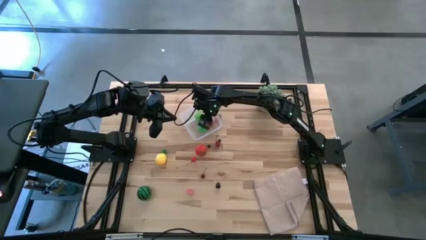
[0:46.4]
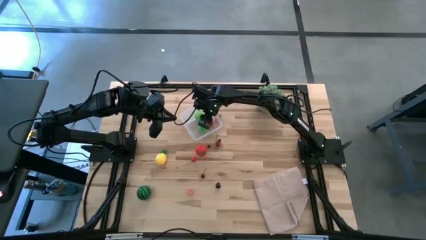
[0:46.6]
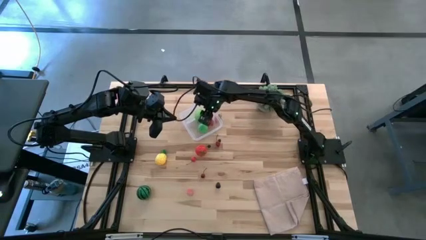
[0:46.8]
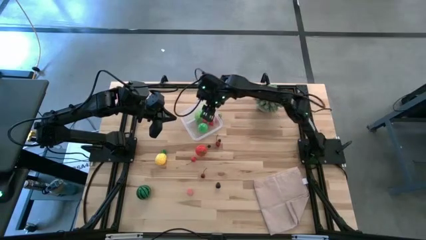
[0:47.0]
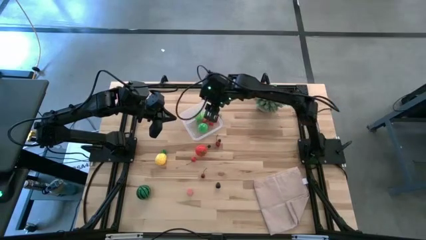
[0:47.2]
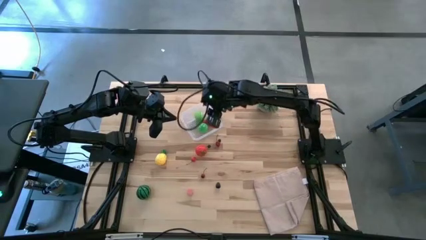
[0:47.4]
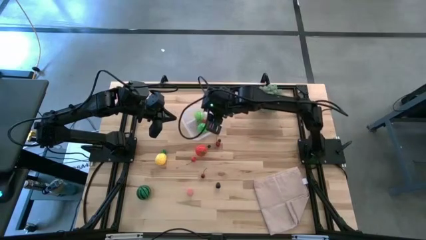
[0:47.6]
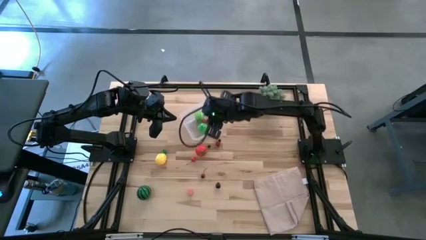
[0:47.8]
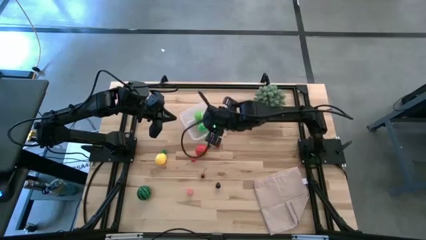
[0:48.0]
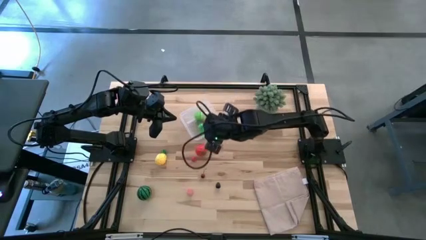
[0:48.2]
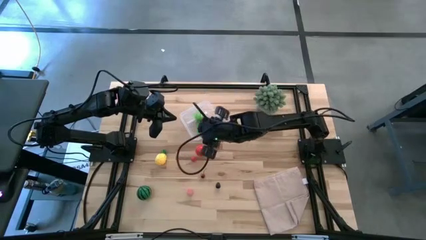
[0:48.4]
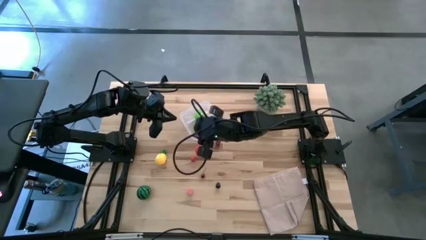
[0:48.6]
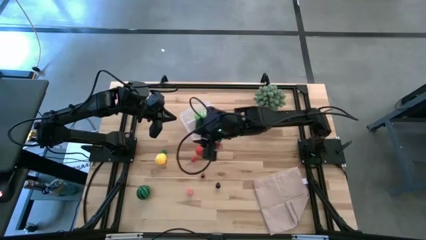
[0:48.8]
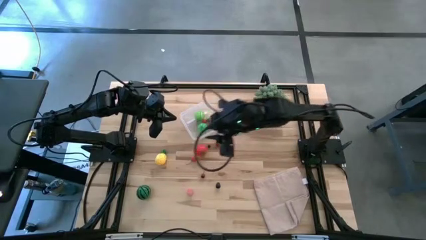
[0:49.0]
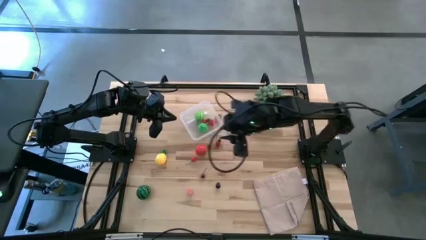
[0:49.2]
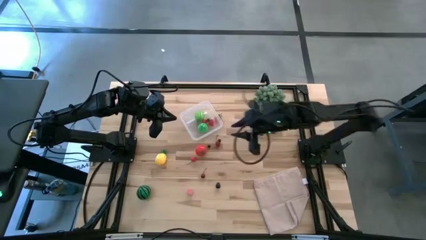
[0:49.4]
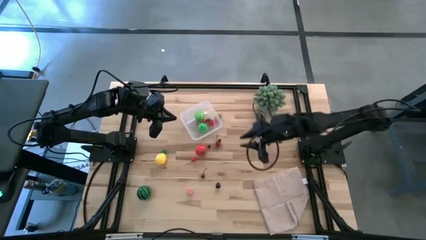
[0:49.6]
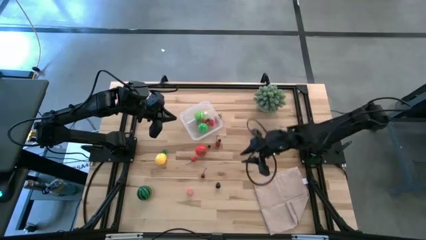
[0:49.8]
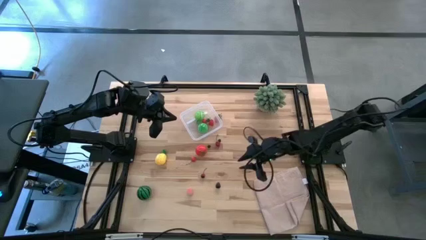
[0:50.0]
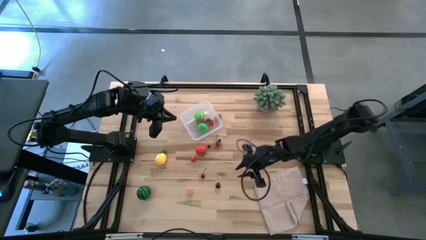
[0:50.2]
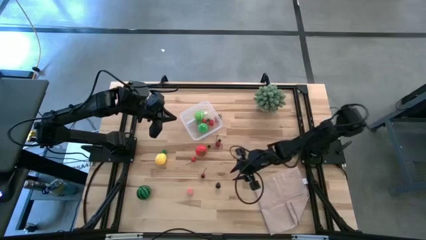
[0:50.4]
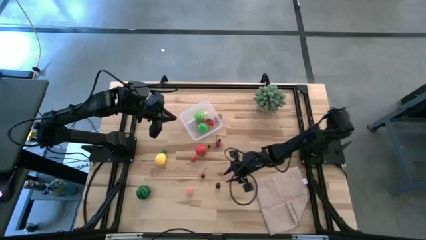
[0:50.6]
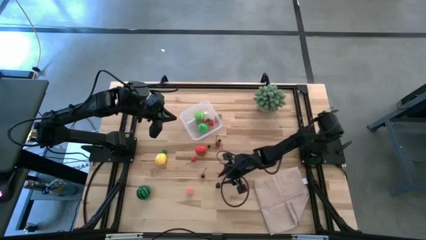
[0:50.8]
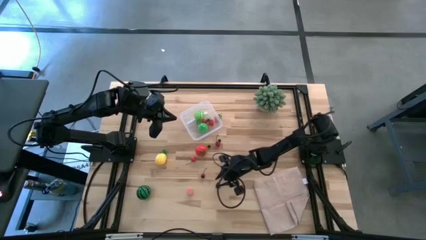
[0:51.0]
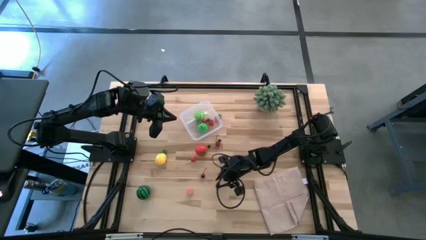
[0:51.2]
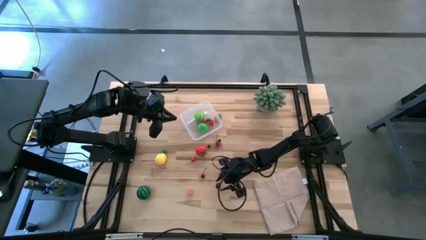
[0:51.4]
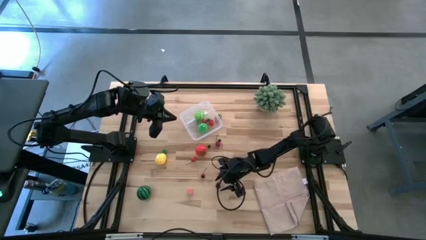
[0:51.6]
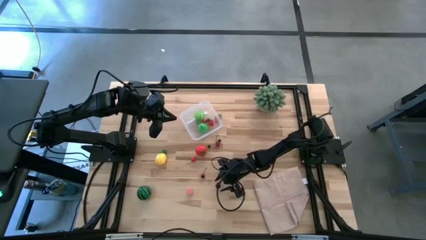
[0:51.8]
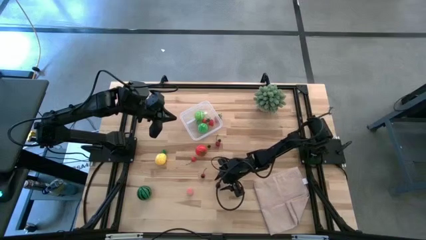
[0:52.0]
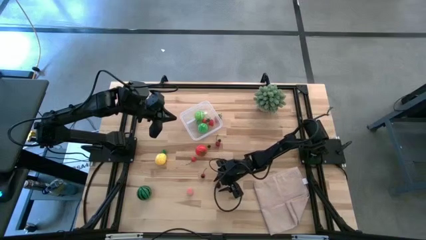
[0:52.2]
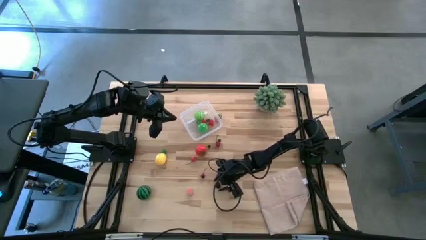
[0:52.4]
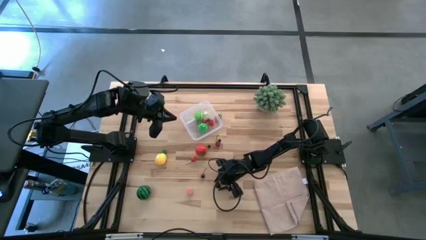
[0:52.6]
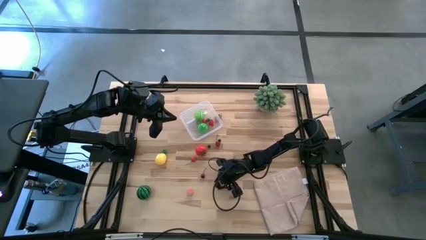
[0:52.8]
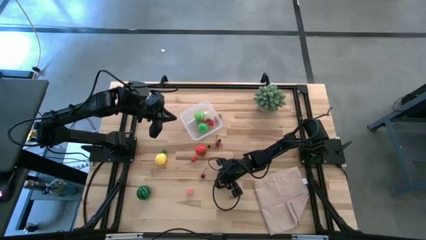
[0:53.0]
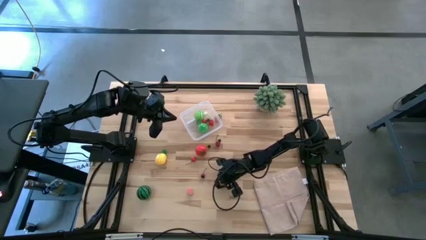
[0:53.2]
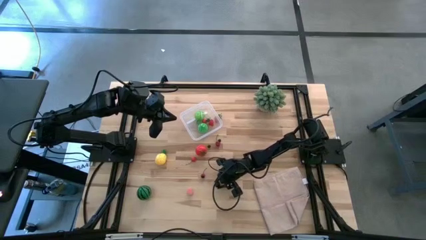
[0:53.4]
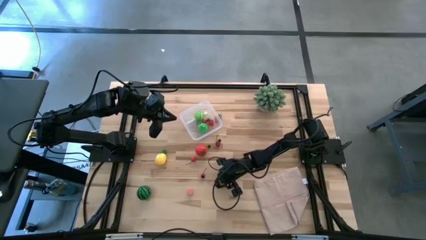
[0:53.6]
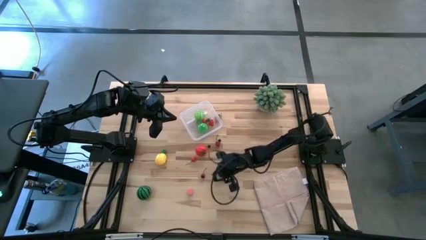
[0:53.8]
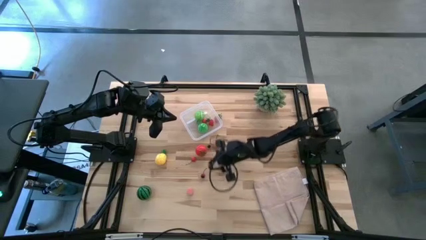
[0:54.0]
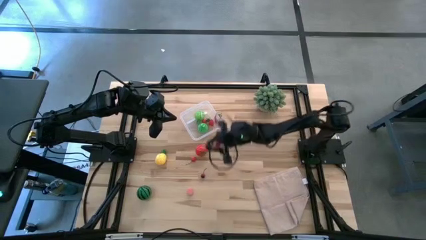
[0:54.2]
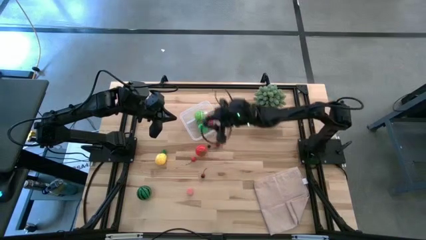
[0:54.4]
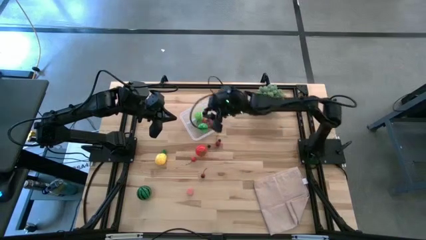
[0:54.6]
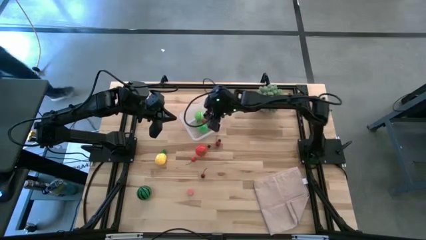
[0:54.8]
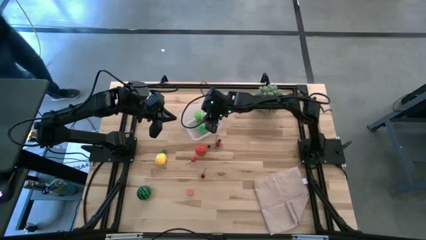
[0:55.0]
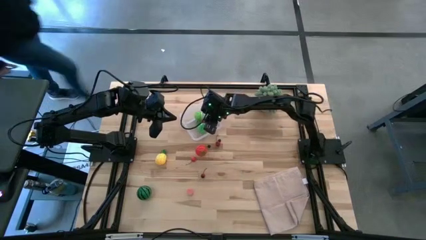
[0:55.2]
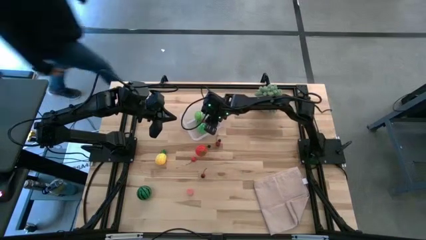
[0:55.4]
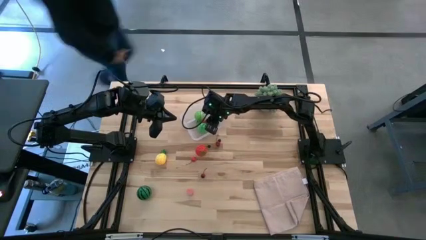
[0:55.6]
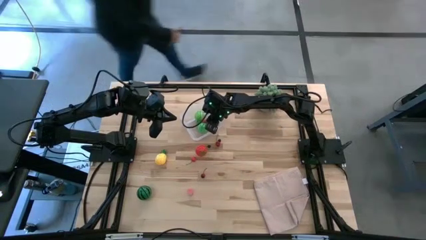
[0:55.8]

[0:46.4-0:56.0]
Task: Pick and placing Produce into tupperware
Put the dark blackberry into the transparent bin

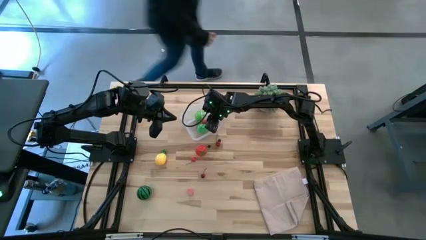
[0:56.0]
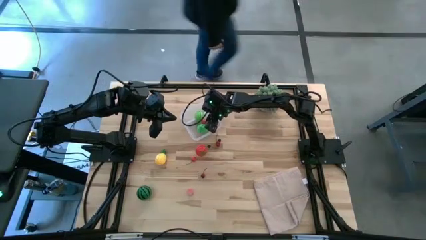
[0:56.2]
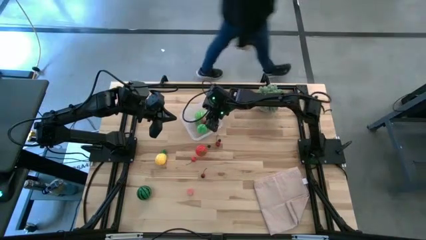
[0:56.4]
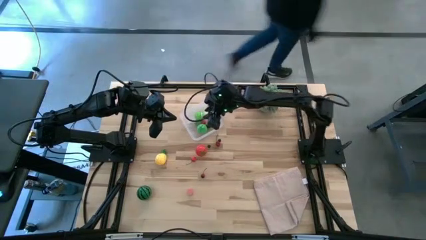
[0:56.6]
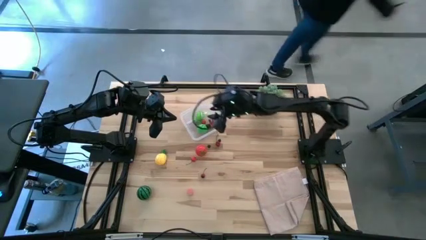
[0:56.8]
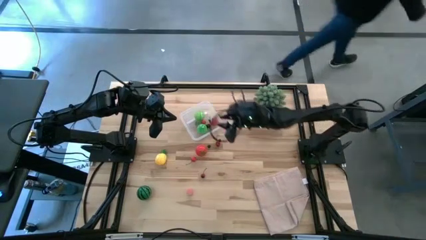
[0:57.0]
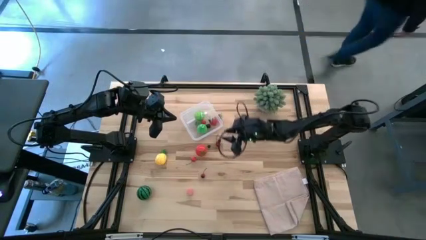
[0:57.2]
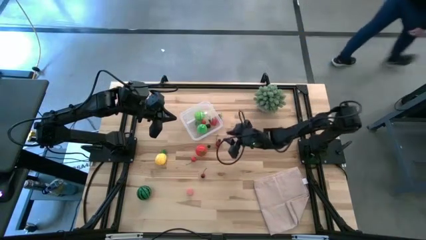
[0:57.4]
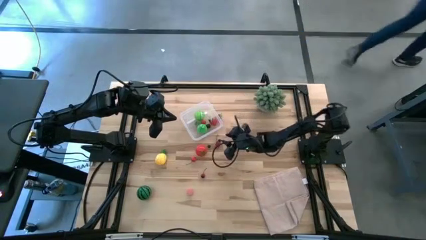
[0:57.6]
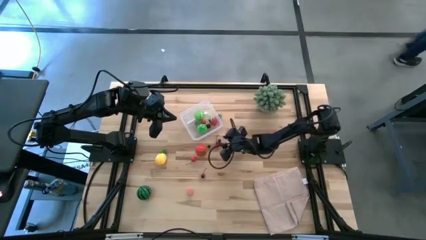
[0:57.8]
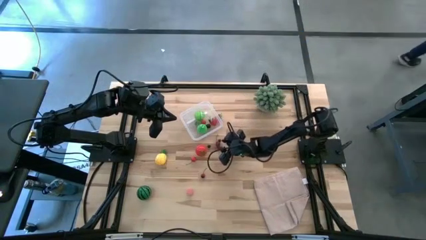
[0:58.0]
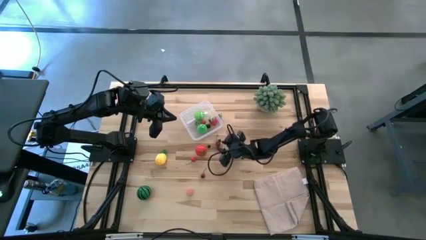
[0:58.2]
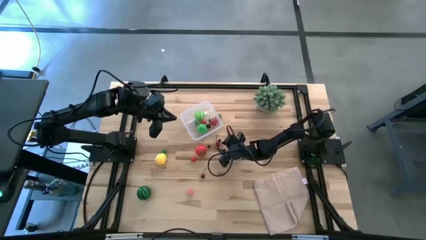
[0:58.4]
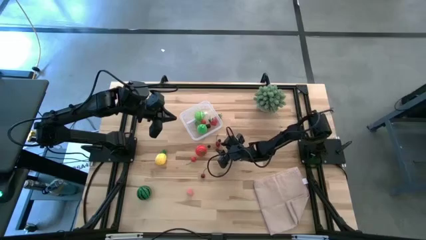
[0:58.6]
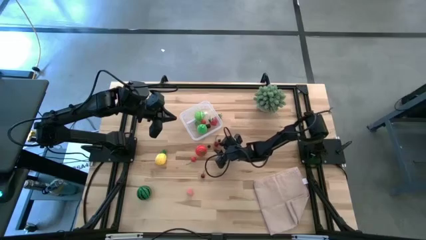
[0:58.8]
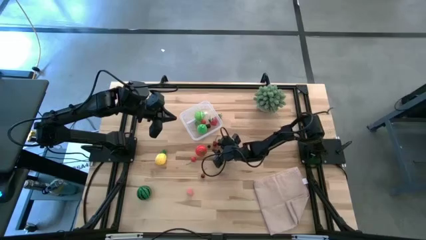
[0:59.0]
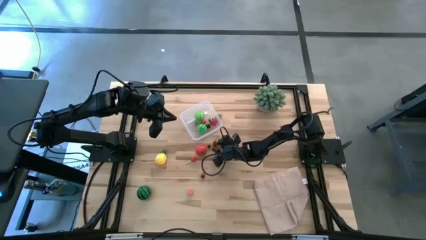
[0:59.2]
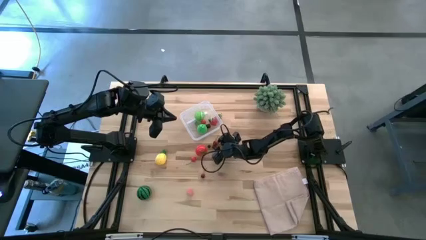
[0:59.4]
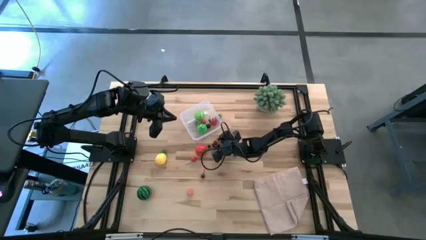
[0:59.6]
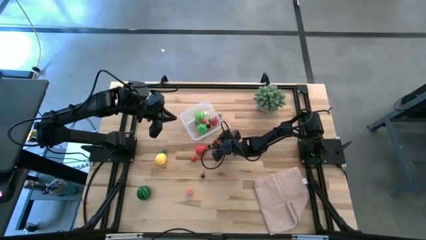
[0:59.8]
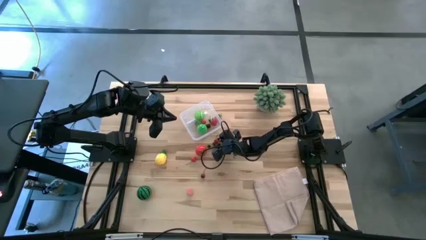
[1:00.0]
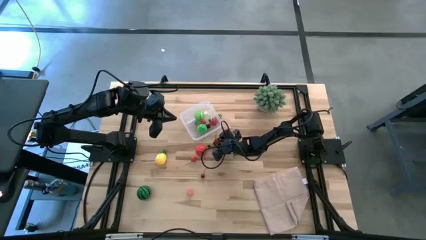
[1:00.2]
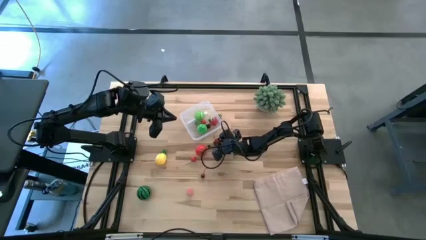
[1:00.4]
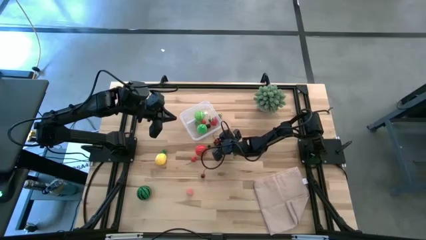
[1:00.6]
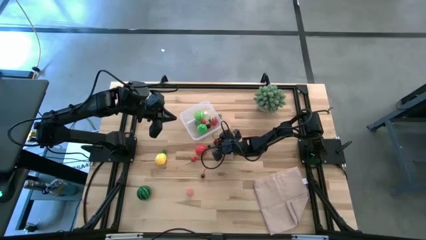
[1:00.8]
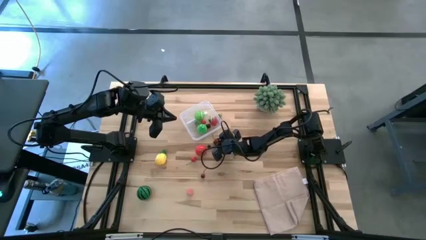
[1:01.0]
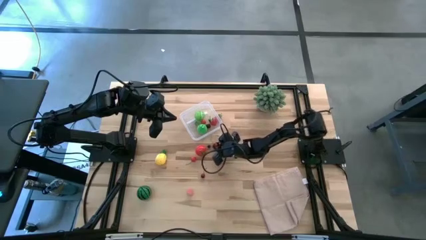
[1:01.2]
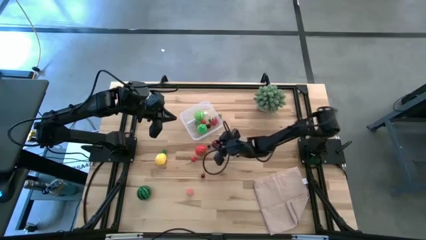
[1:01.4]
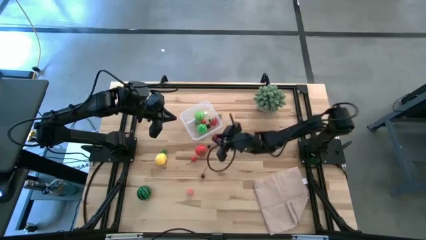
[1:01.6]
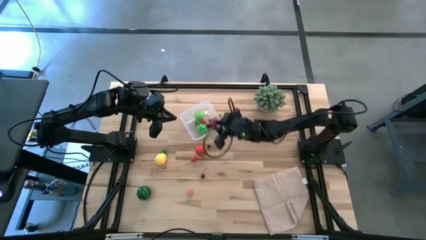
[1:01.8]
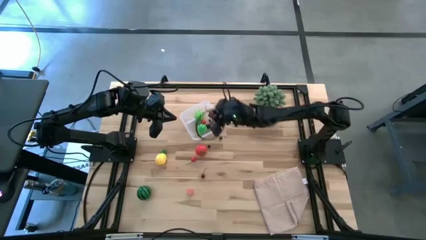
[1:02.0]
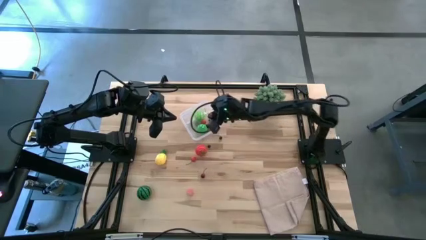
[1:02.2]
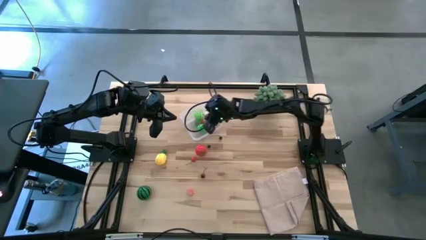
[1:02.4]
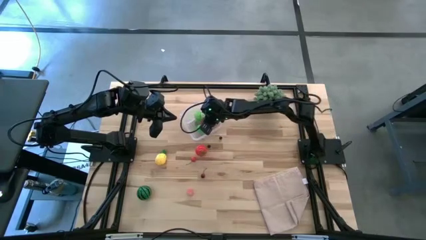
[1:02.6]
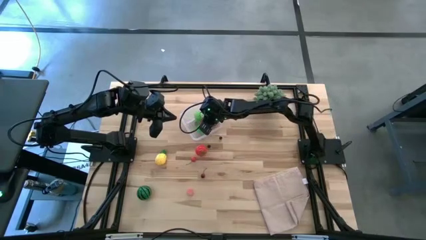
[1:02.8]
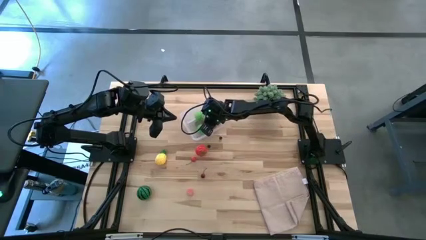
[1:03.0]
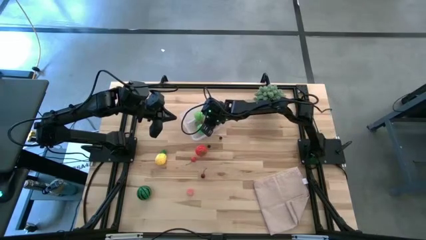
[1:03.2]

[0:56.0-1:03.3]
Put the top dark red cherry into the transparent bin

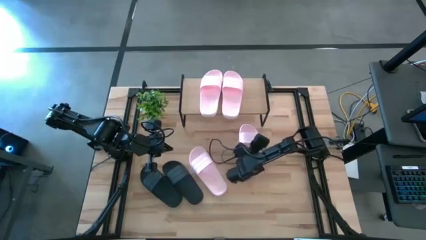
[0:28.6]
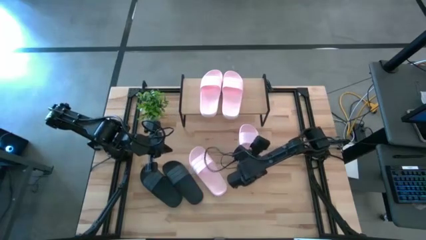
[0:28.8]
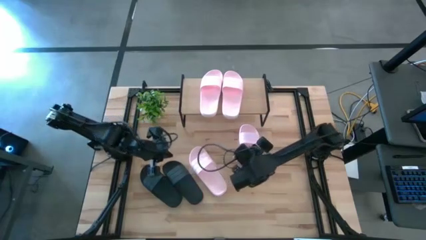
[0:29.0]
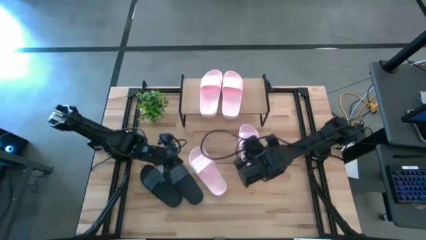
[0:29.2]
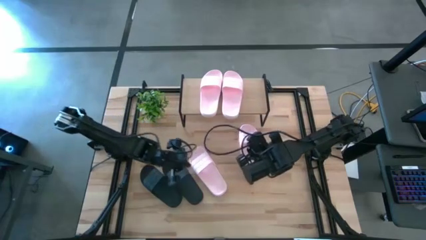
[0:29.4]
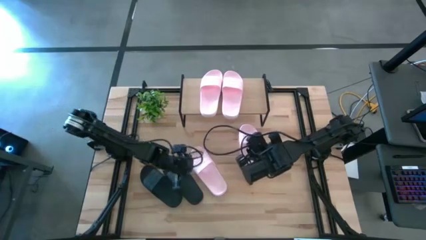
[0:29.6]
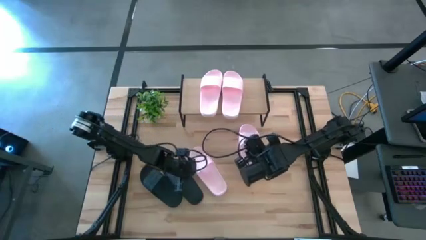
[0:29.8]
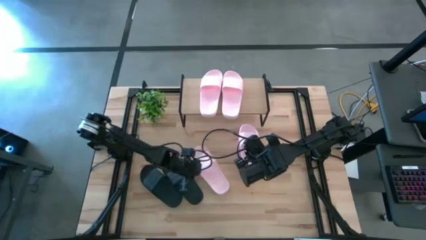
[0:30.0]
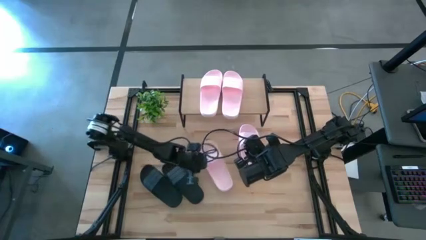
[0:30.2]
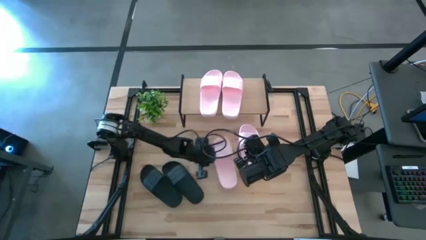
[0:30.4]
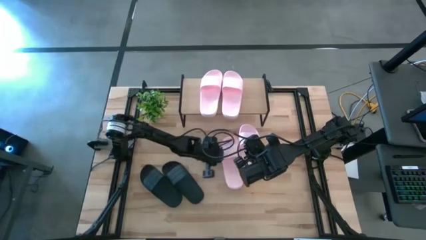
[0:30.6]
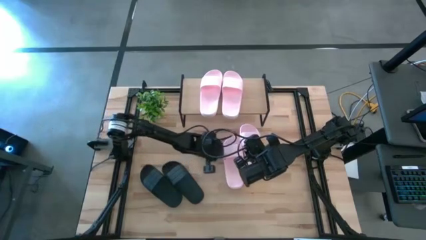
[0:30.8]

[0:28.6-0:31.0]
Task: Pick and place slides into the shelf
Move the left pink slide beside the right pink slide on the table
